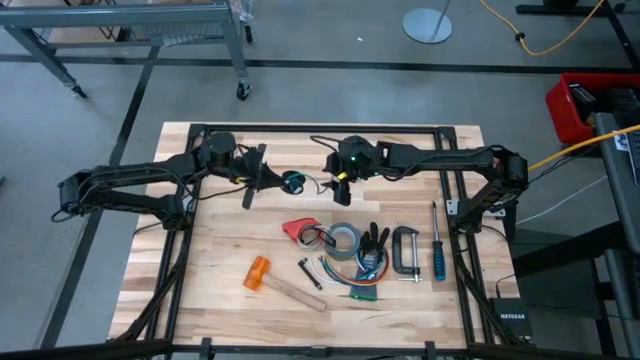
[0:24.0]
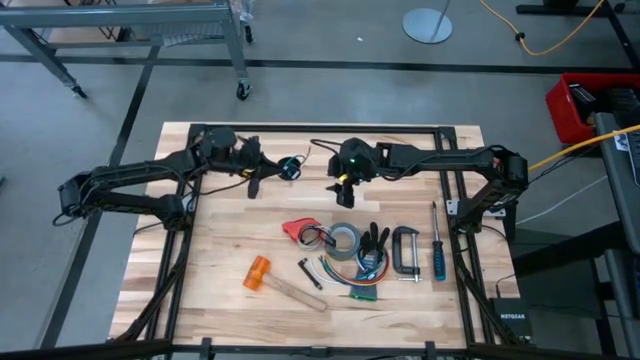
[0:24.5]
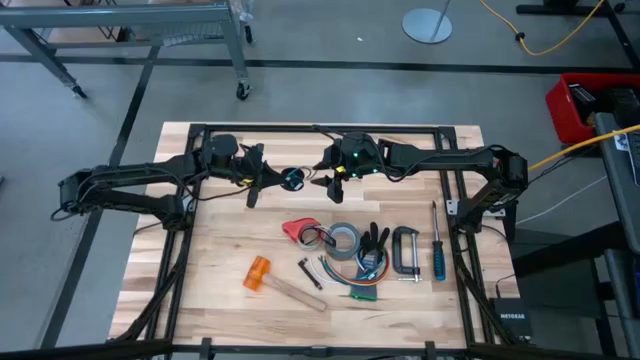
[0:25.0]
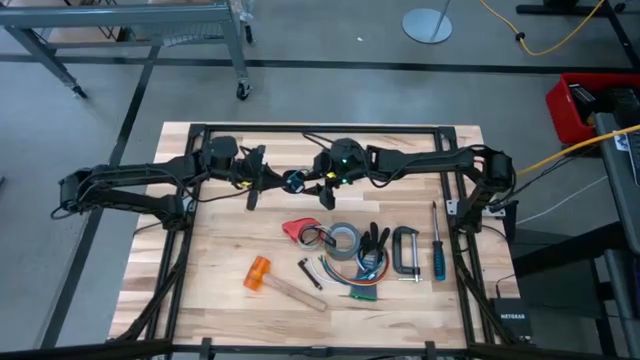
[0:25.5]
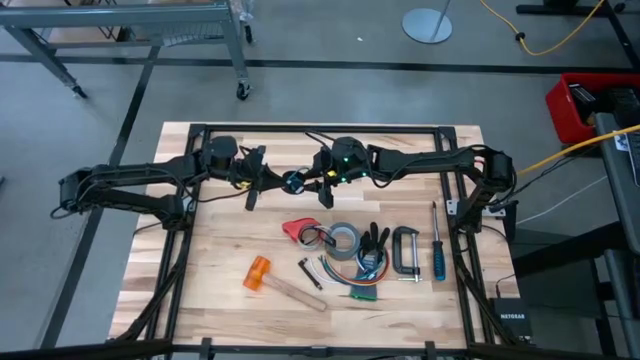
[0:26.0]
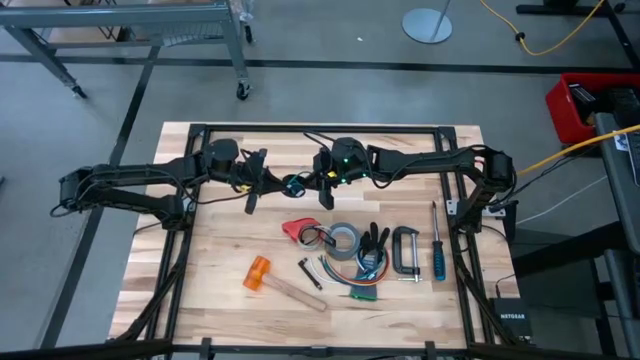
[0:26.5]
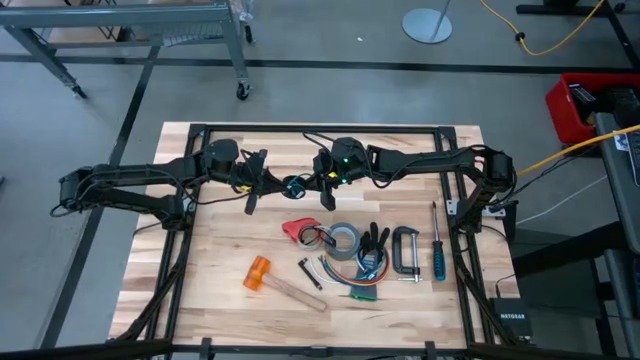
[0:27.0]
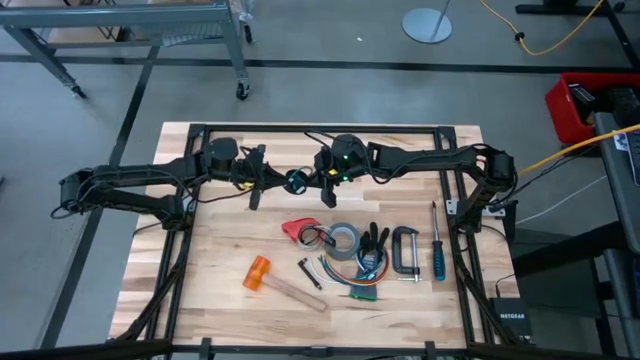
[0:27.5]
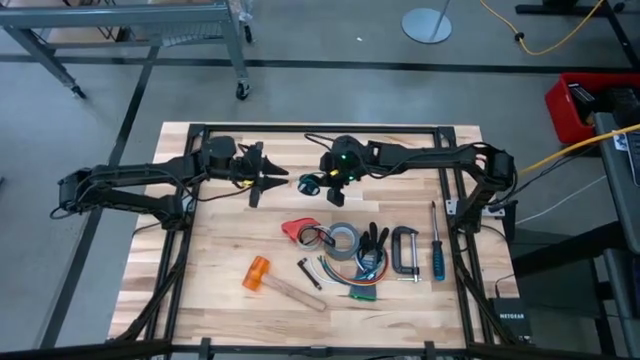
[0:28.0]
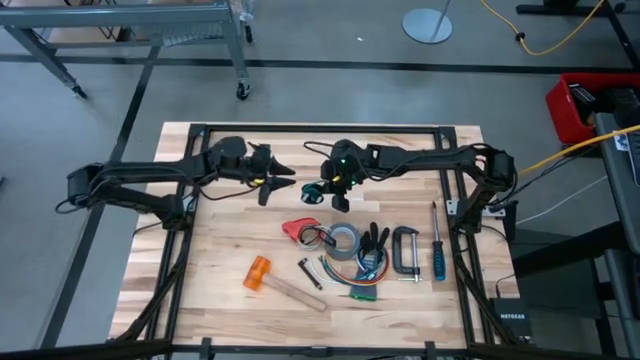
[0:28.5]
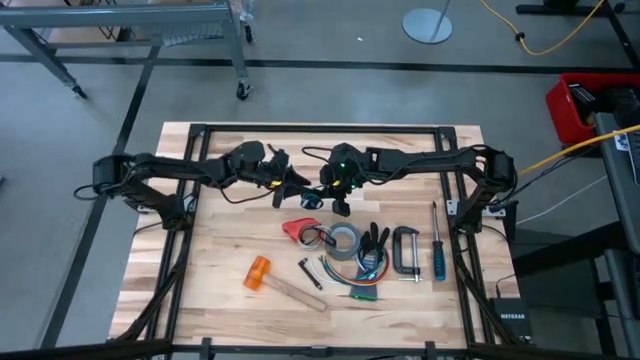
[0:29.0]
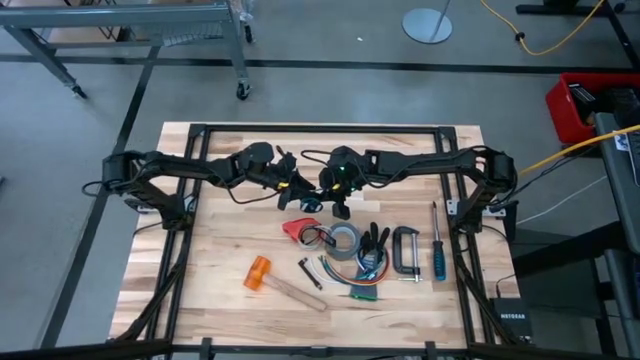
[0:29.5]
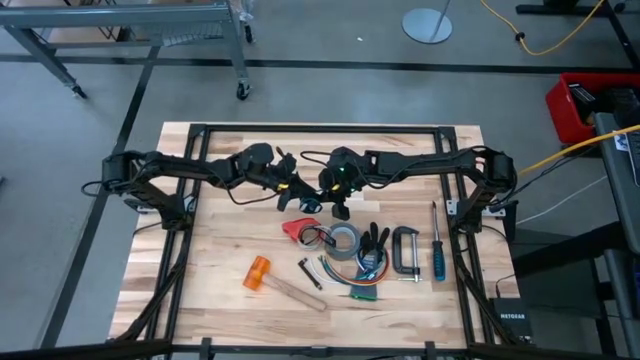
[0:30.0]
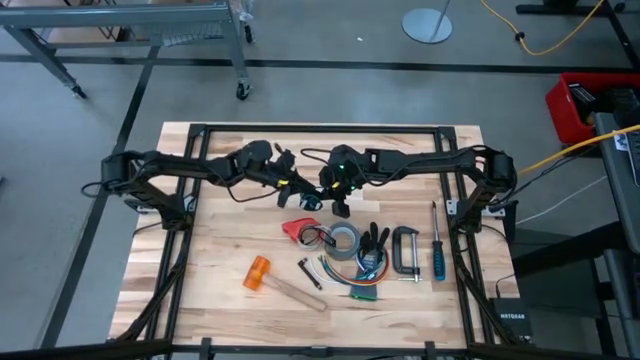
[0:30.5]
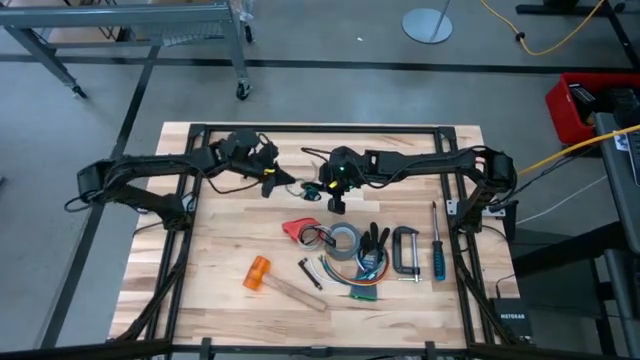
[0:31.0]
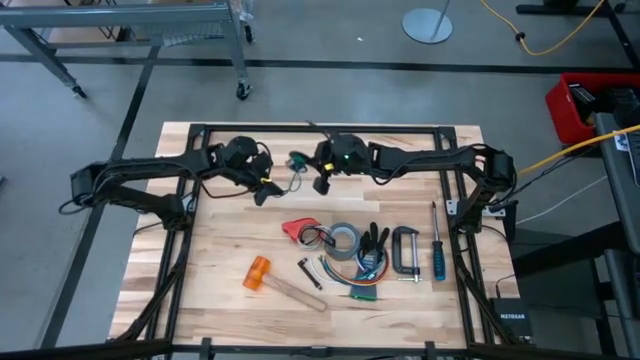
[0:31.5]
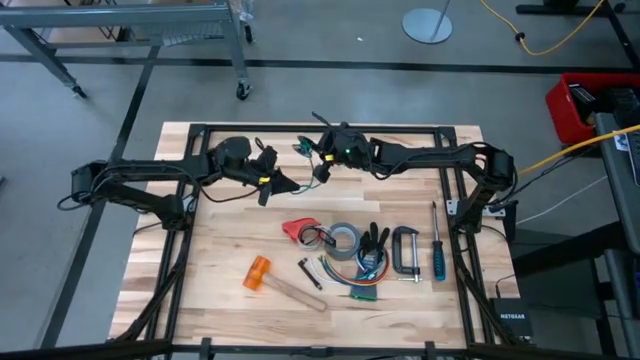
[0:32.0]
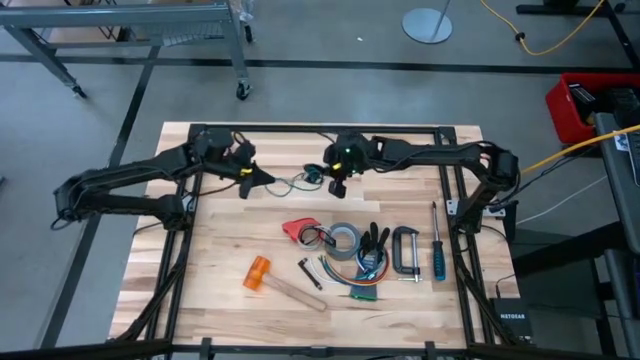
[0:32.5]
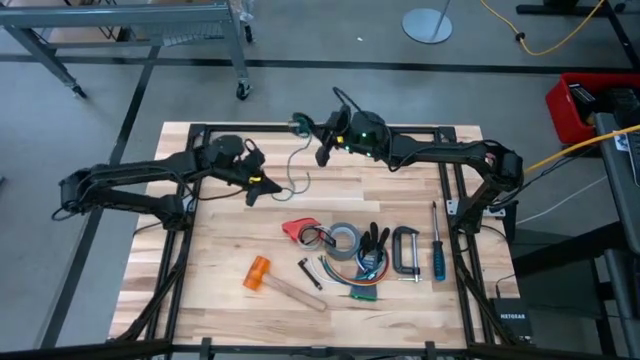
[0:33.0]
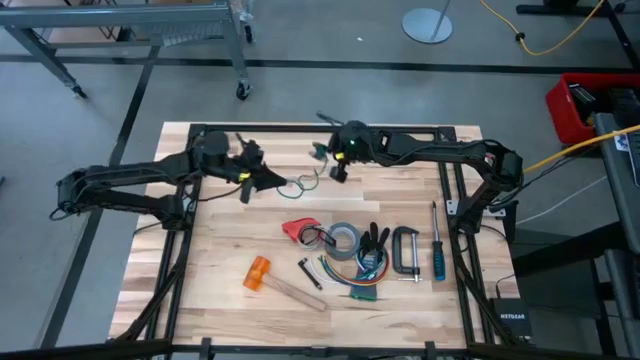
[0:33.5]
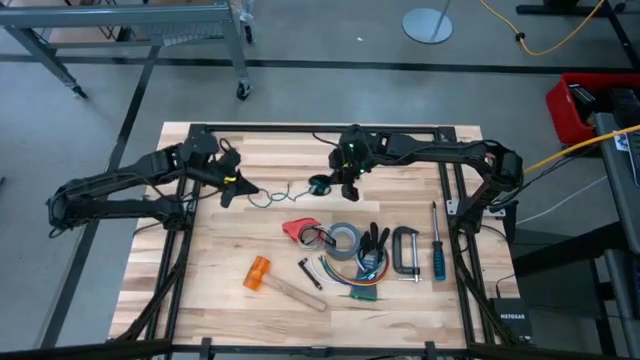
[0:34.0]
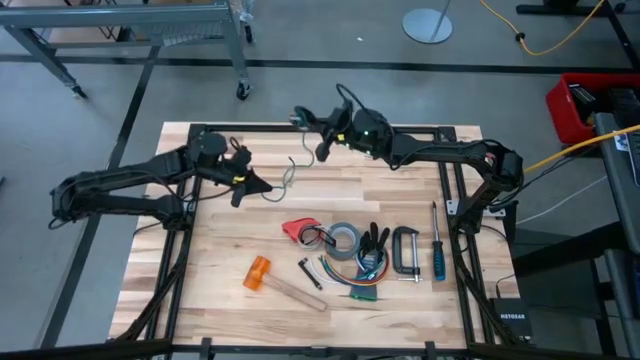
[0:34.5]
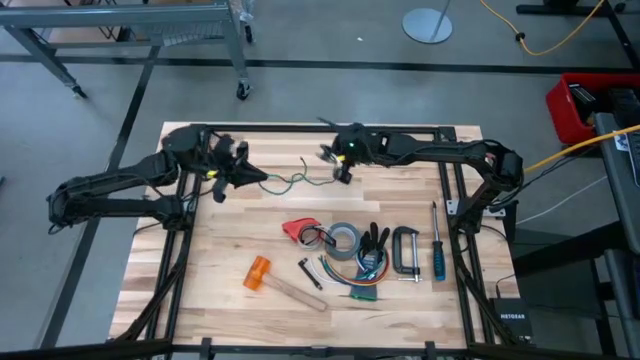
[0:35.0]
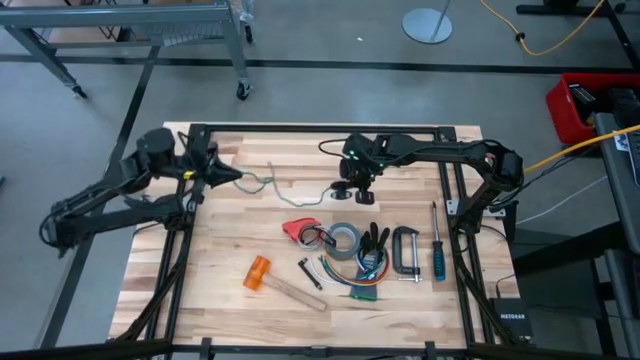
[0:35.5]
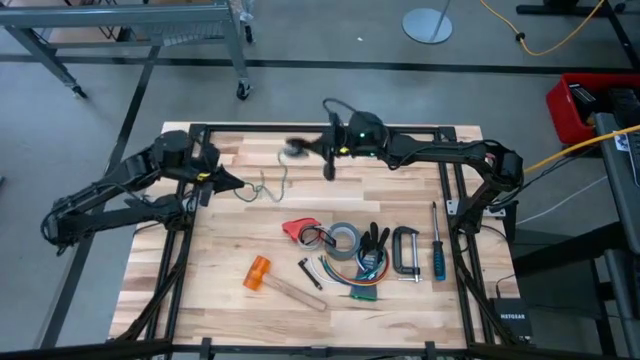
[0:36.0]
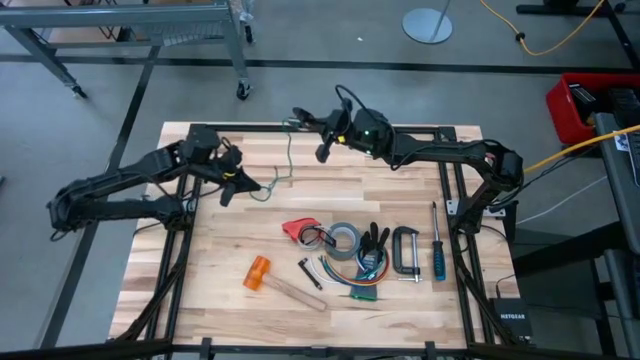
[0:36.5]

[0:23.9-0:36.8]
Task: Coil cords
Uncoil the green cable wire from the black spool

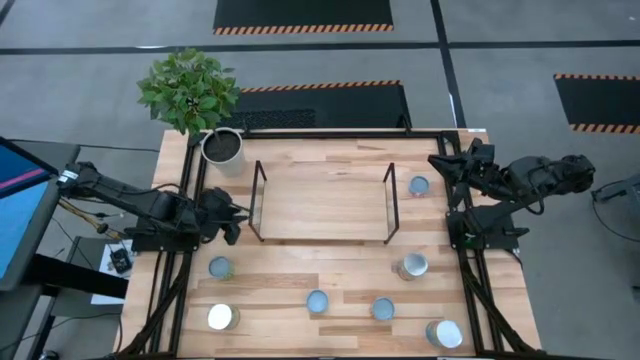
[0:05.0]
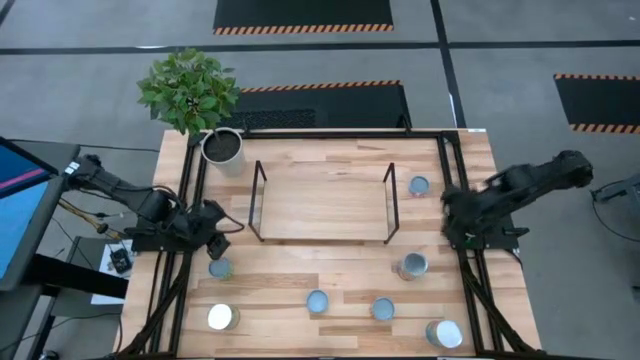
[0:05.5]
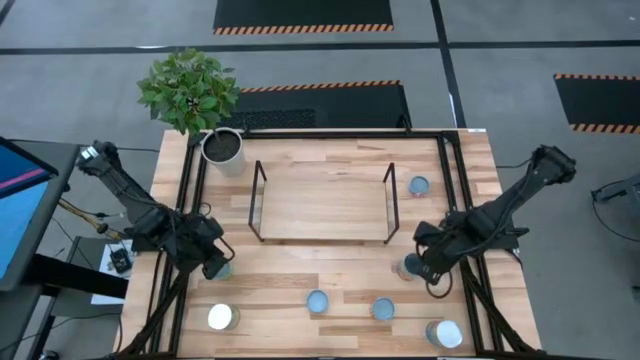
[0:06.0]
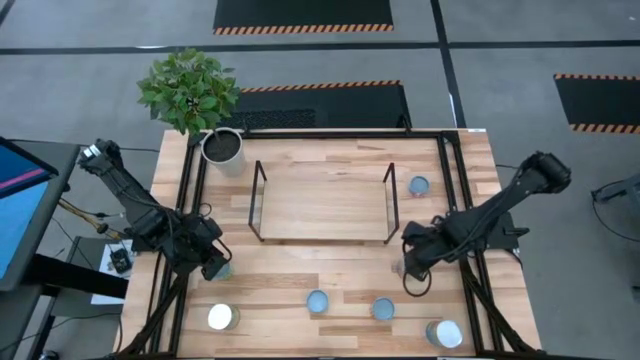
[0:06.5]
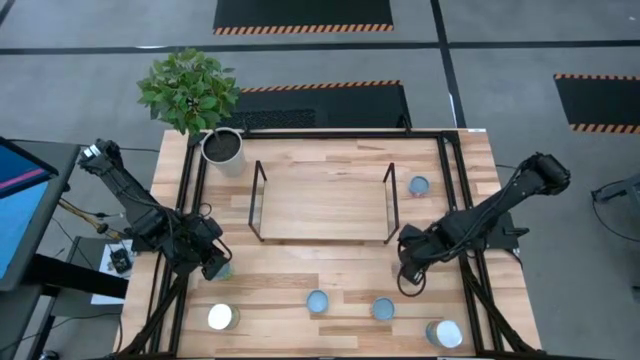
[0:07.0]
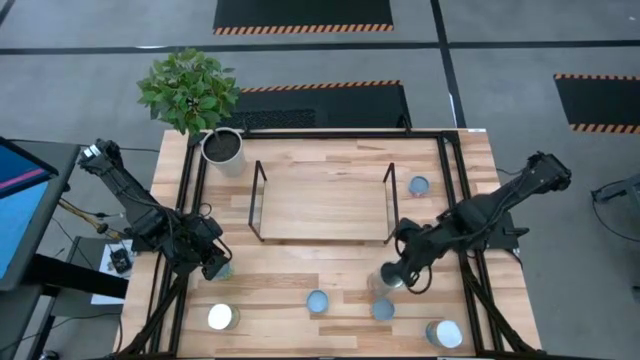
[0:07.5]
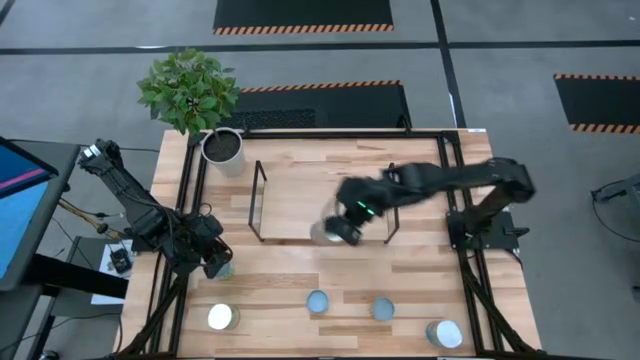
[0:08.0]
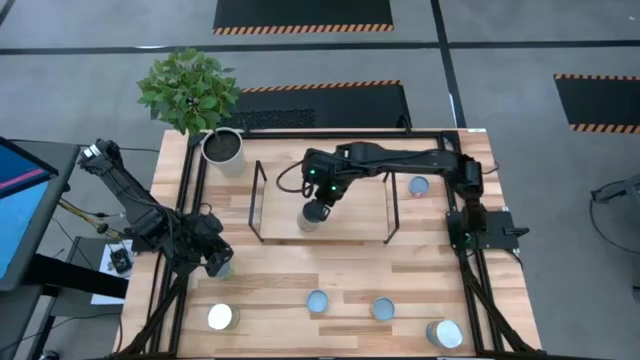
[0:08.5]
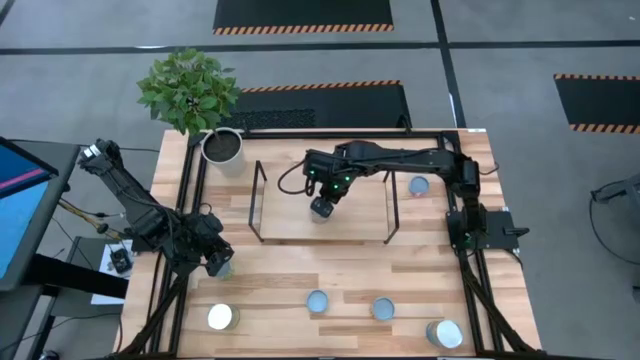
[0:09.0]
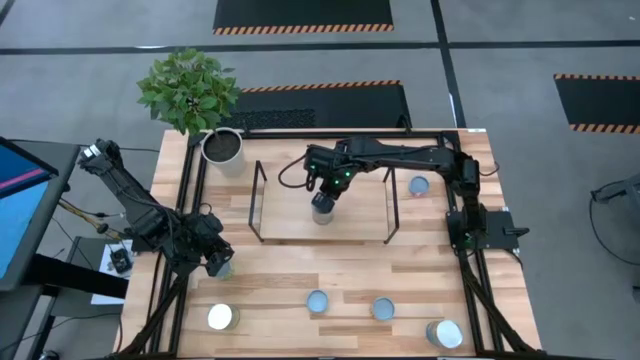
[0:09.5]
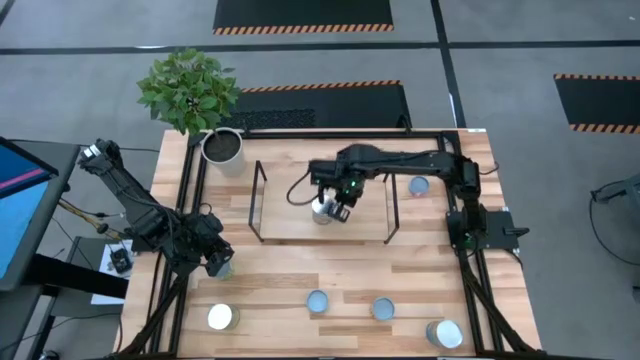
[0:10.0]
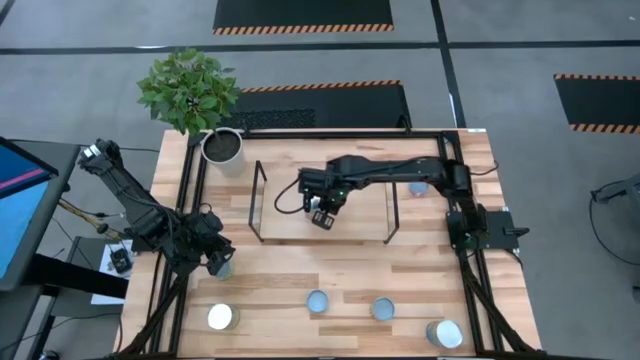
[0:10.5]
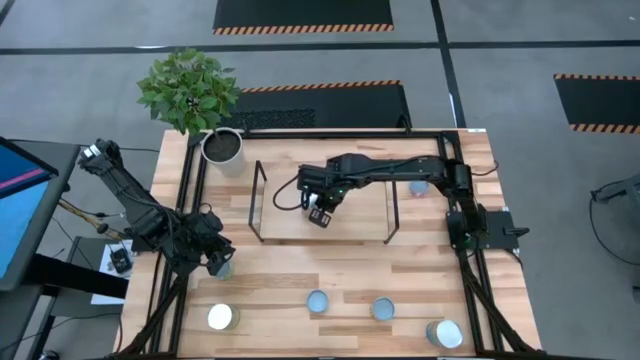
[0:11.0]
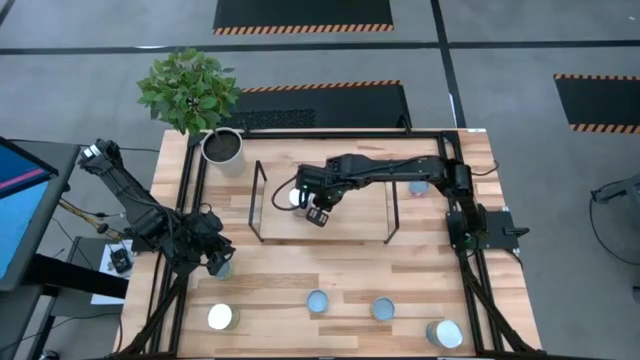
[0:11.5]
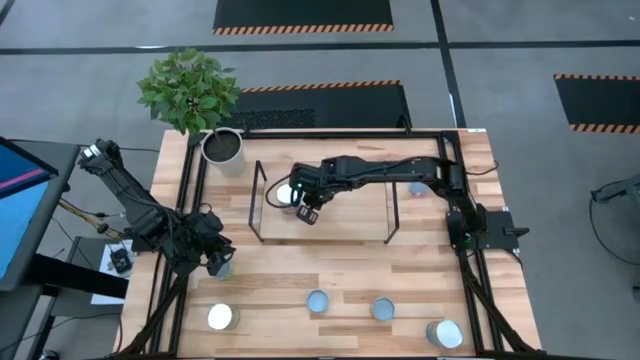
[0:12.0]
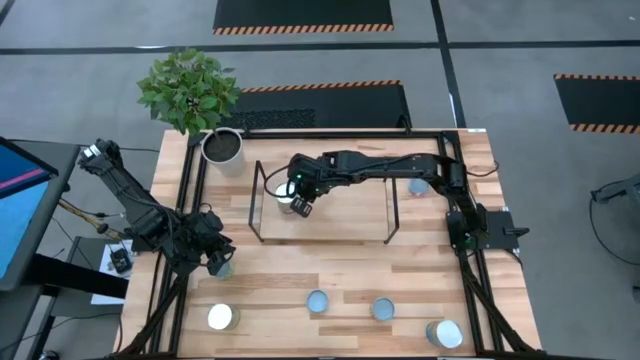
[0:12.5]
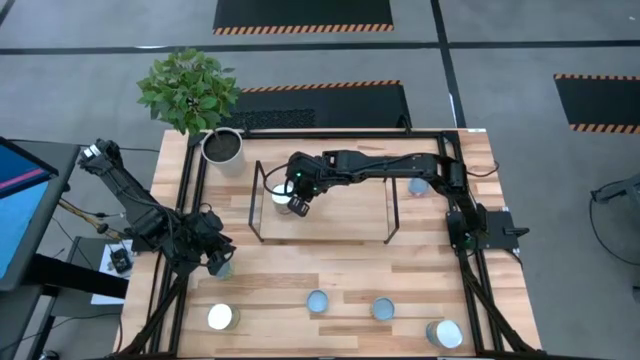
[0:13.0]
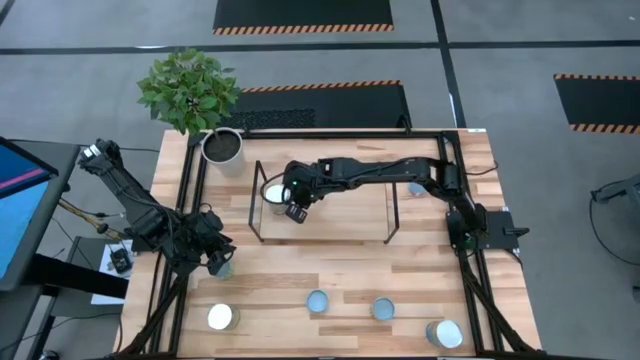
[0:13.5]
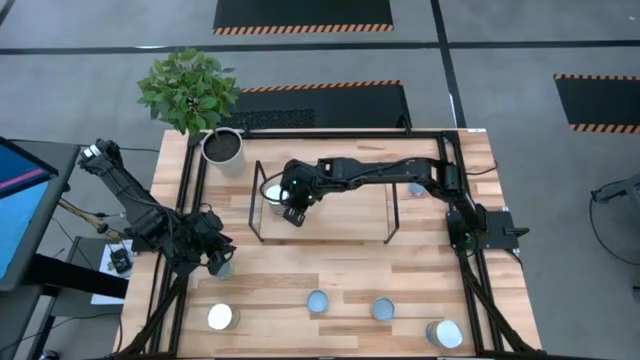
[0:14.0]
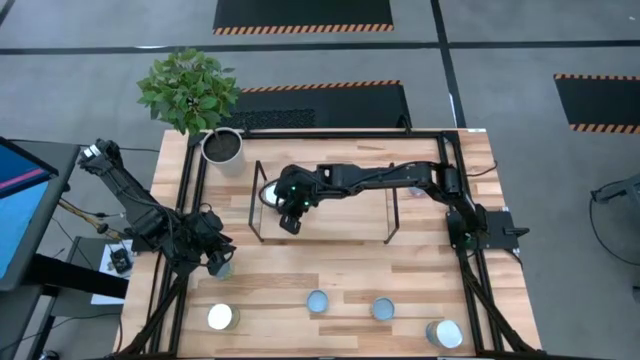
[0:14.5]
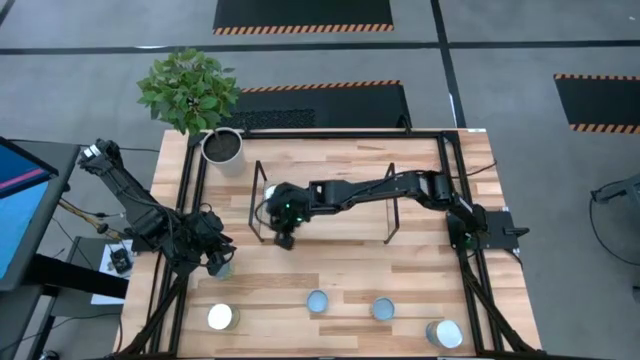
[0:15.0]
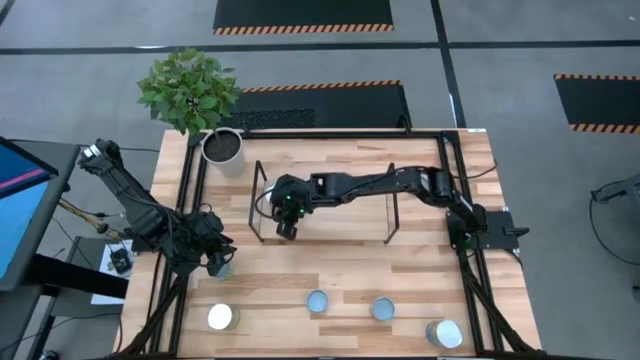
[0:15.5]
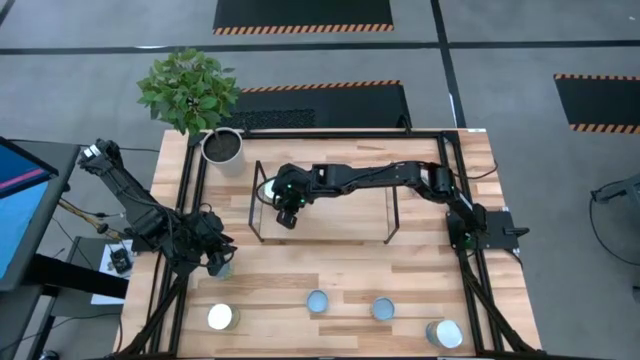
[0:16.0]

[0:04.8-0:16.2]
Task: Pick and place cans onto a shelf
Put the canned peaches on the shelf
